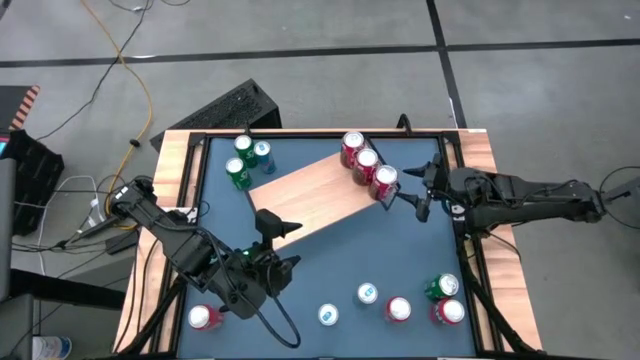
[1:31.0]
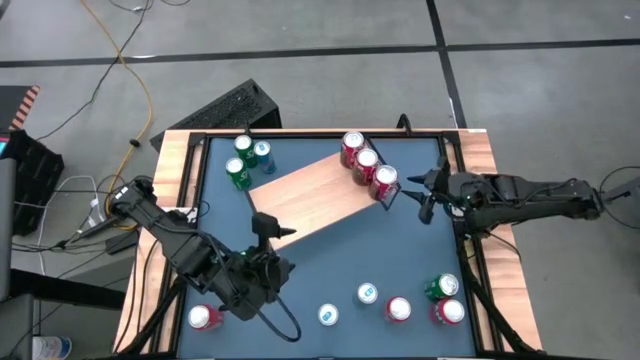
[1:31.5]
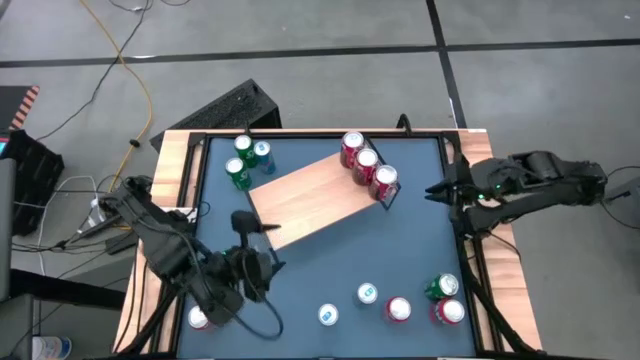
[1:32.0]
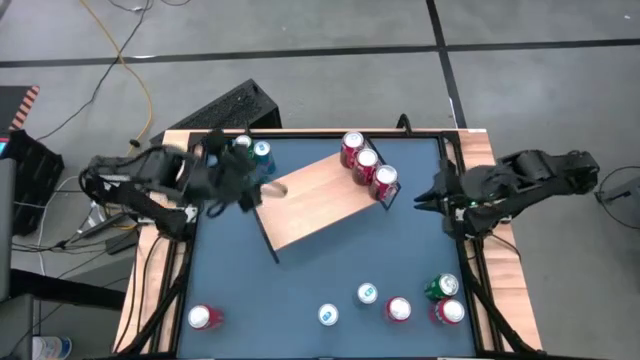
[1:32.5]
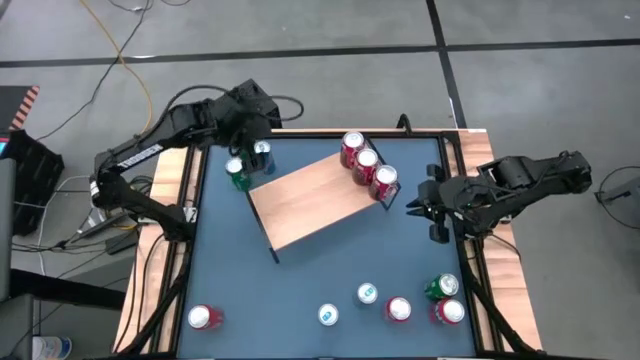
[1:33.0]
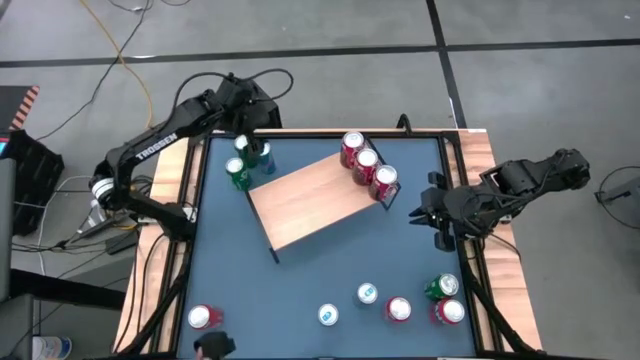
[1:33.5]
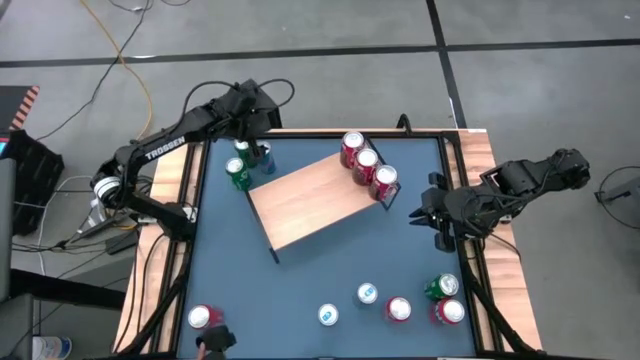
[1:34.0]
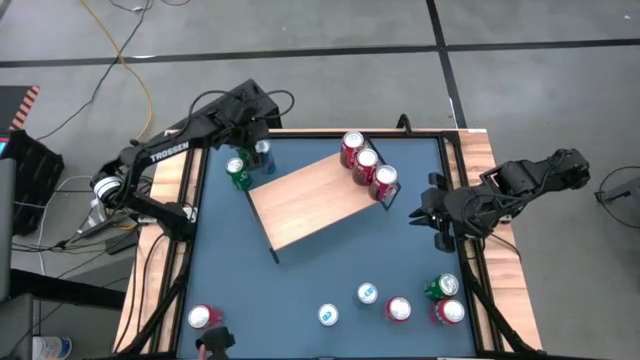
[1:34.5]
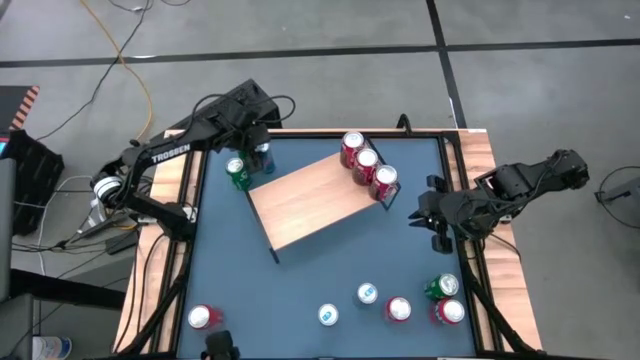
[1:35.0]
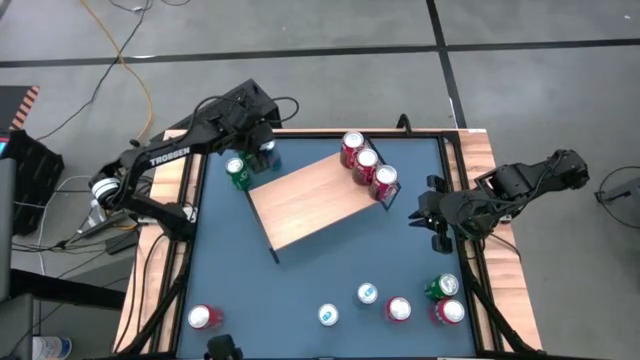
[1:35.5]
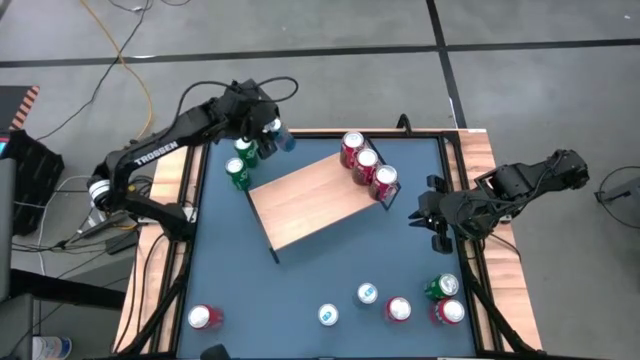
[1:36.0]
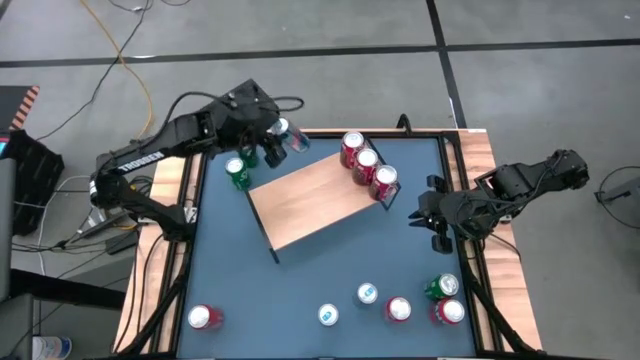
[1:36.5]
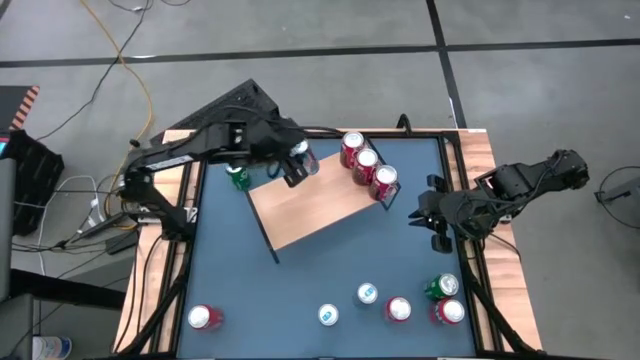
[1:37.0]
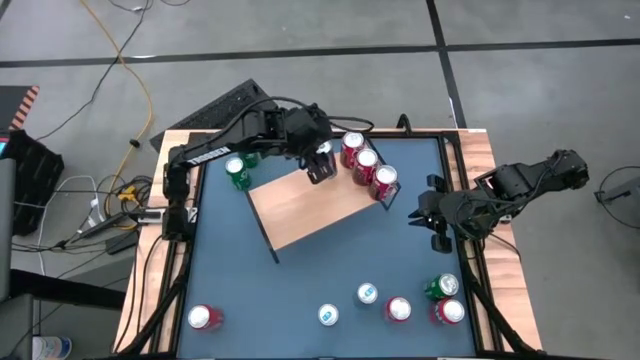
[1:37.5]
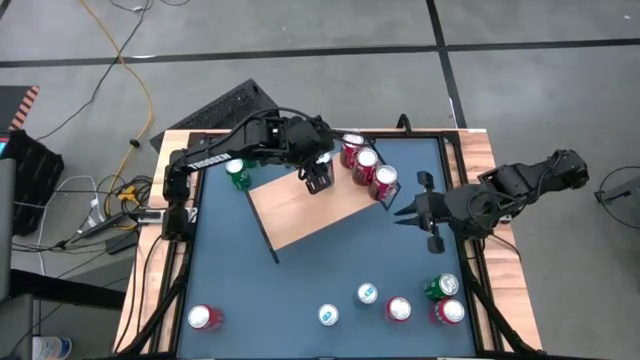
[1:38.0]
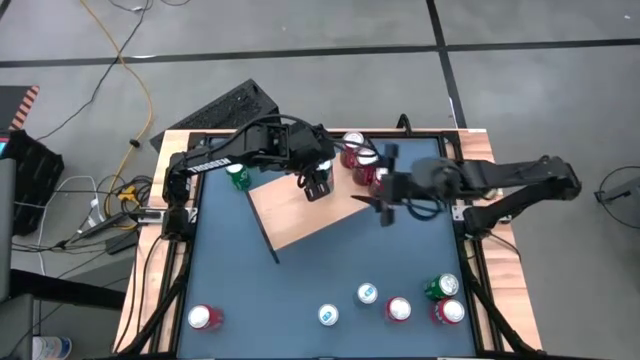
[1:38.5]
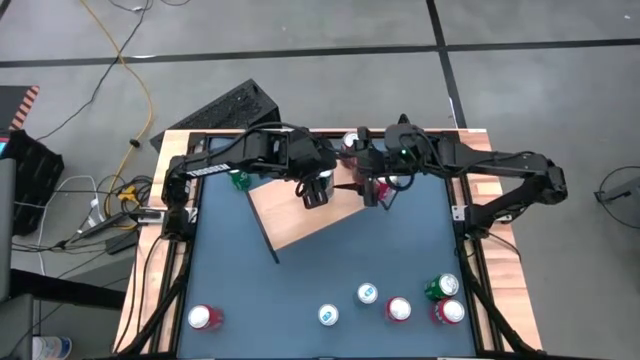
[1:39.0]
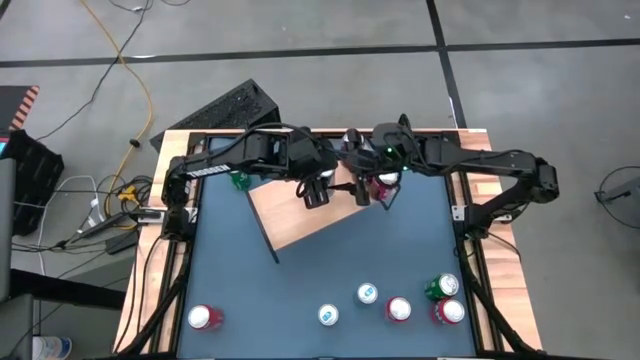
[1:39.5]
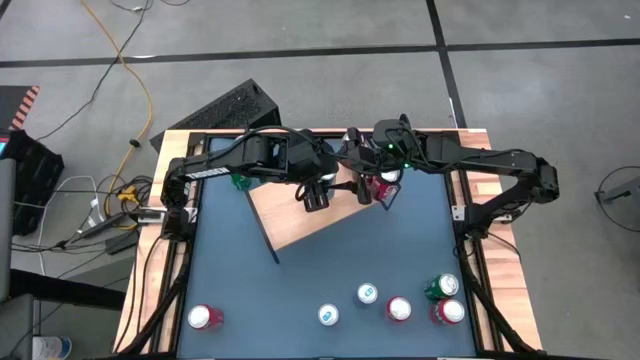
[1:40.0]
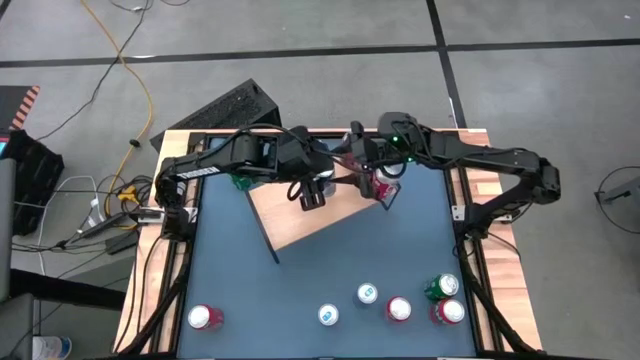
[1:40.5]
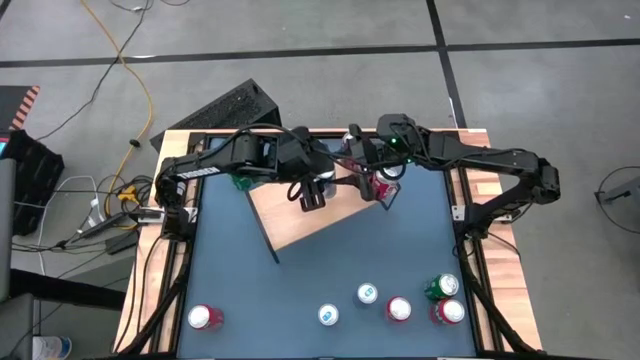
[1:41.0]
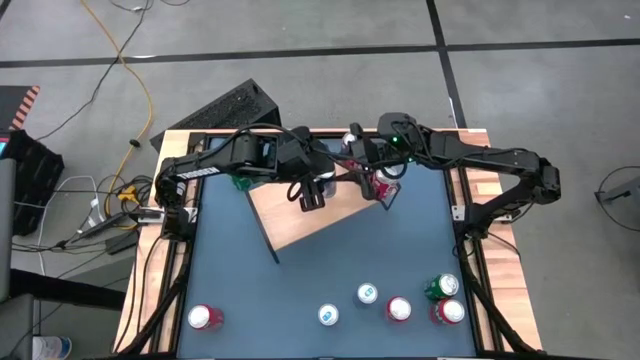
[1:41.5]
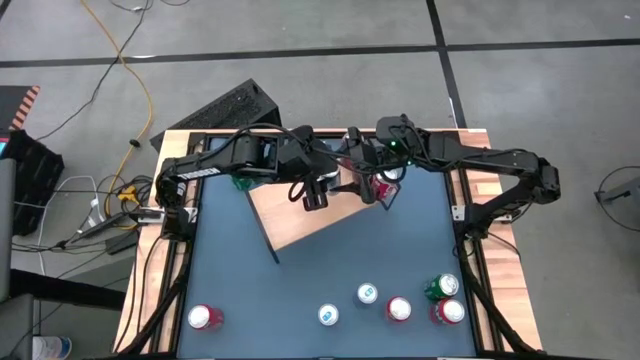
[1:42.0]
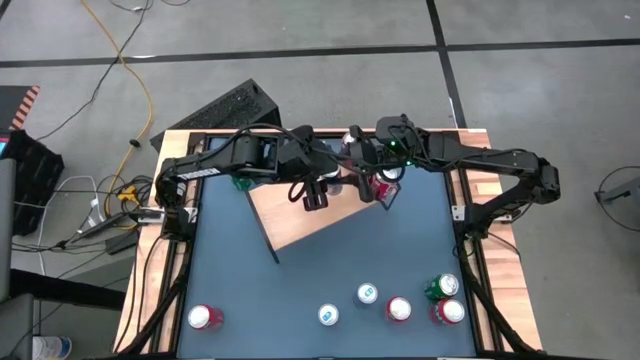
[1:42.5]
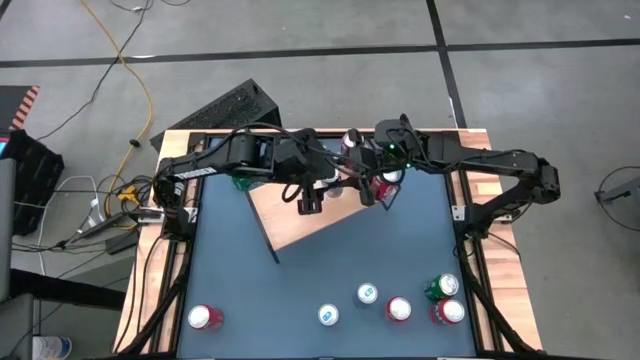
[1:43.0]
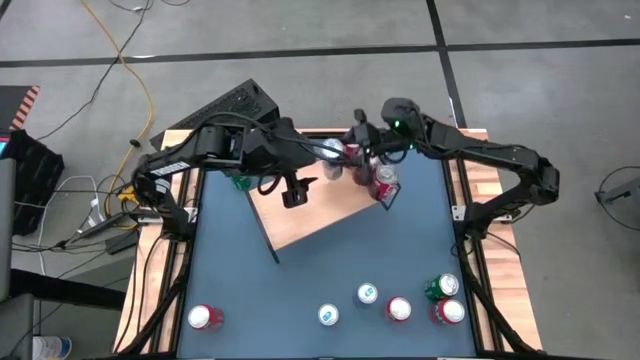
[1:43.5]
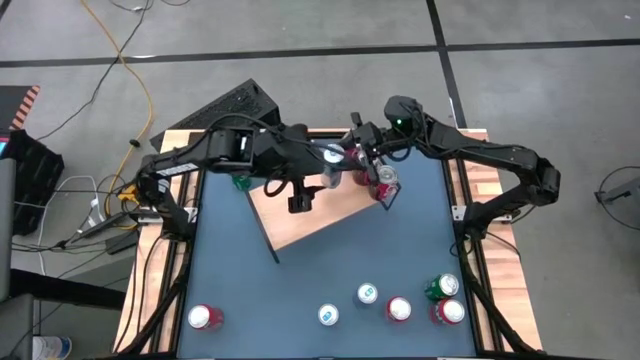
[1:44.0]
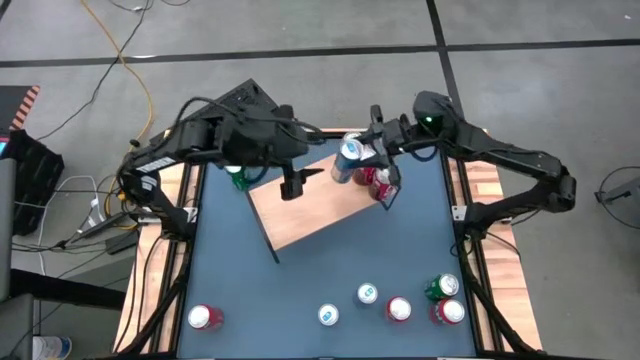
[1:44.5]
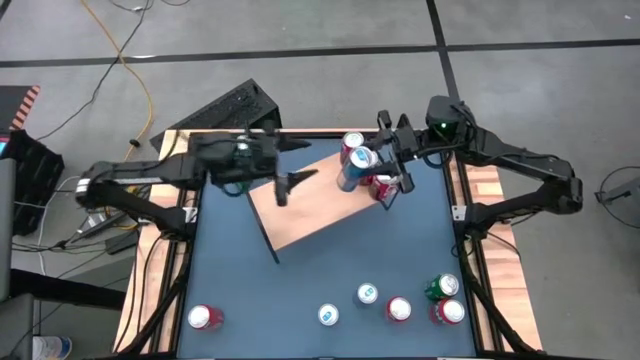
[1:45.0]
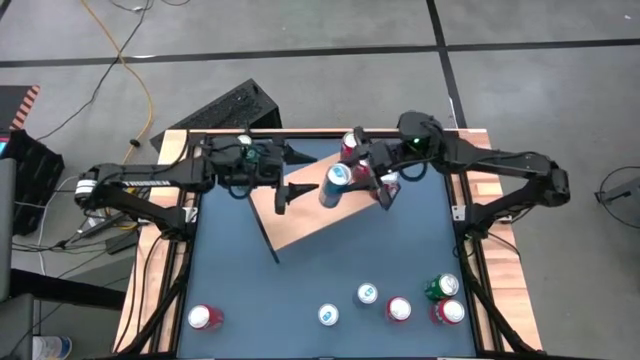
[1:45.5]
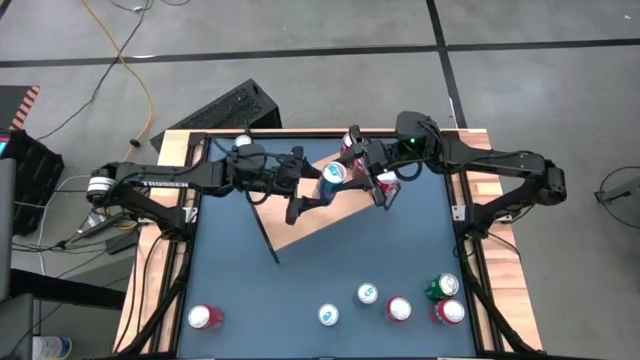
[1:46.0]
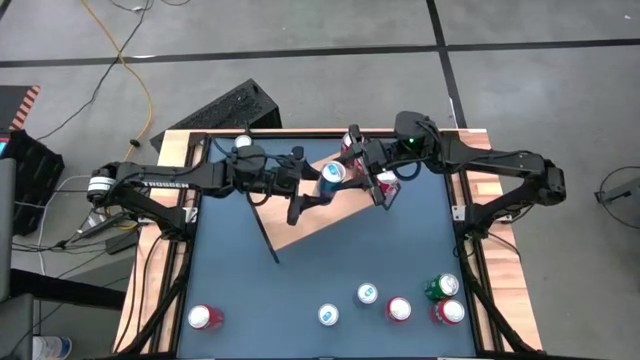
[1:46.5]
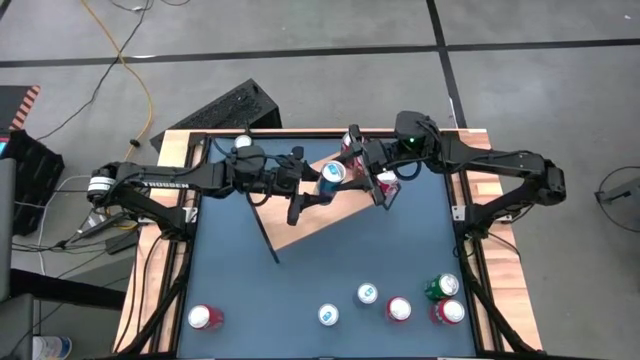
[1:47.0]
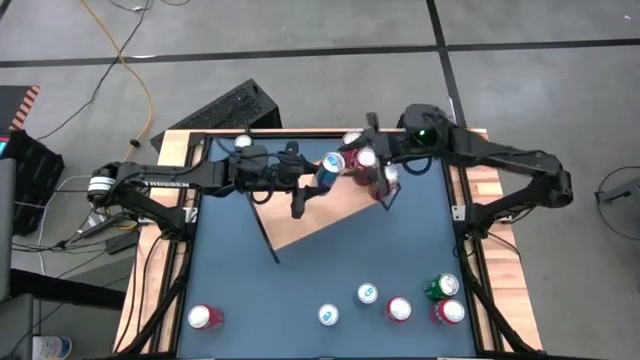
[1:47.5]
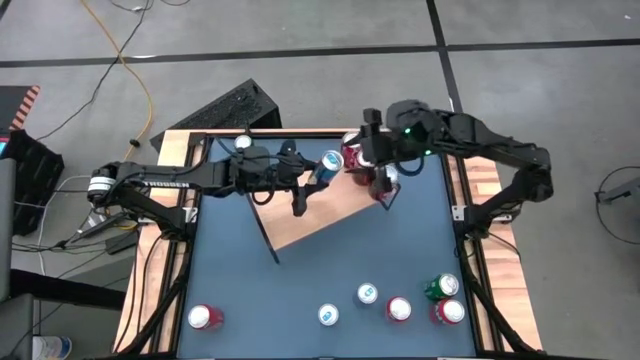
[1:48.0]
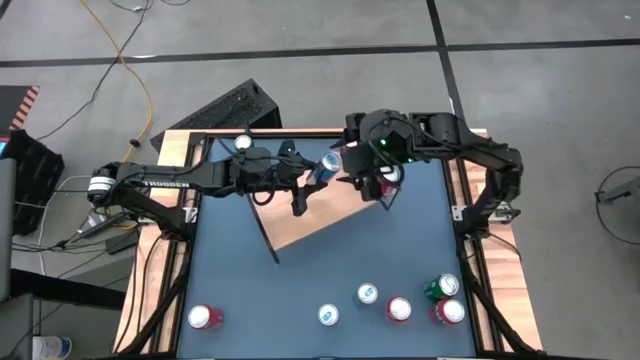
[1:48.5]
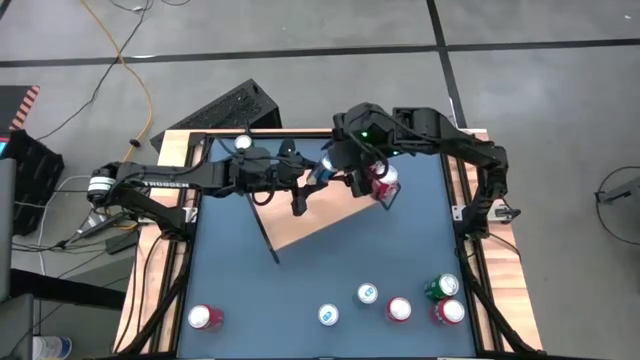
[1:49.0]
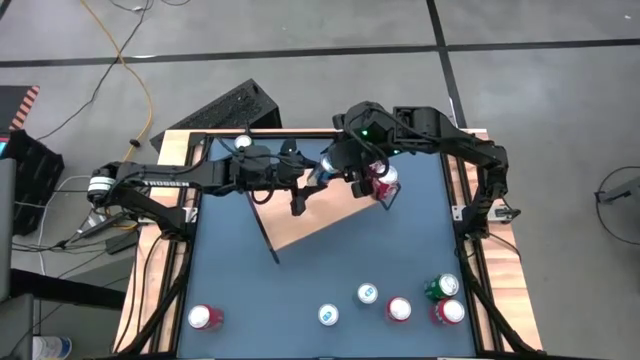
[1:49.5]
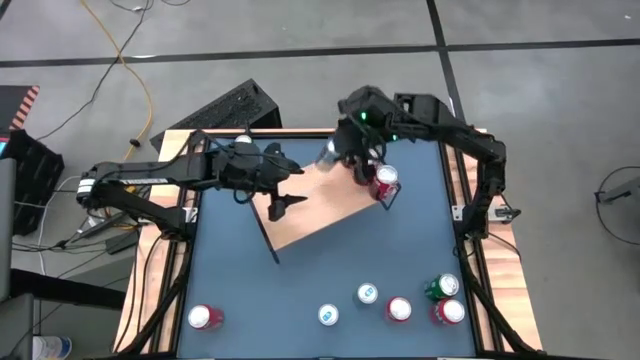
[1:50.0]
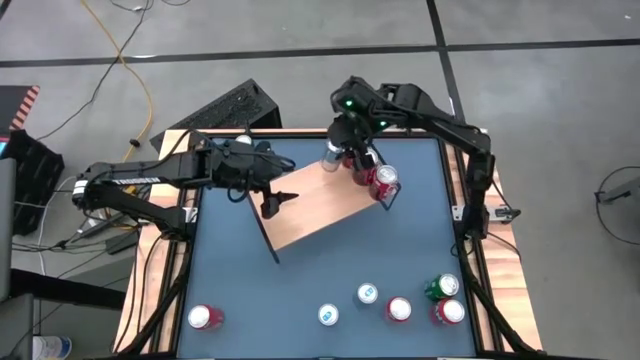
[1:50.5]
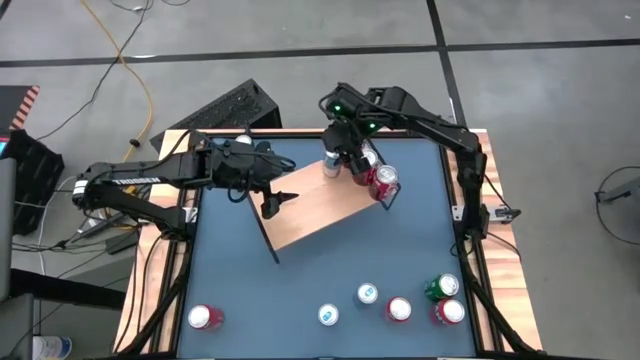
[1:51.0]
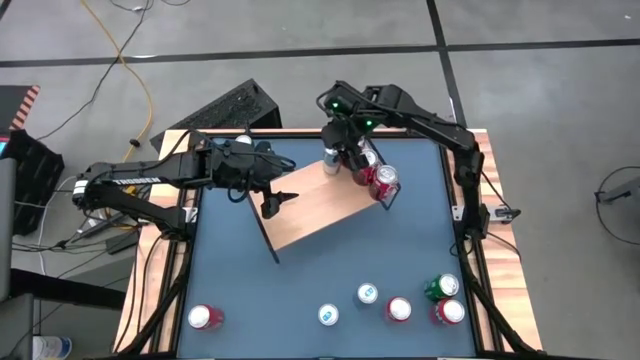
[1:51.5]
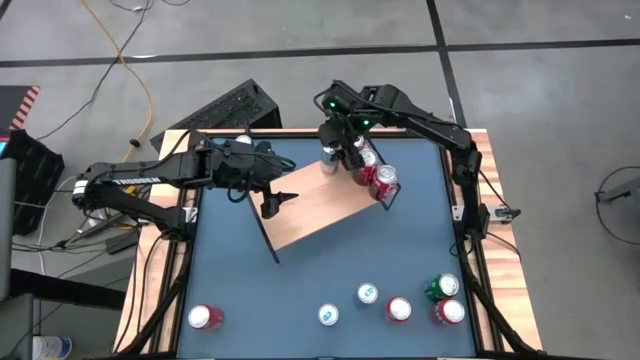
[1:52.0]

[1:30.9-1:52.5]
Task: Place canned beverage on shelf
Put the top blue soda can on the shelf
